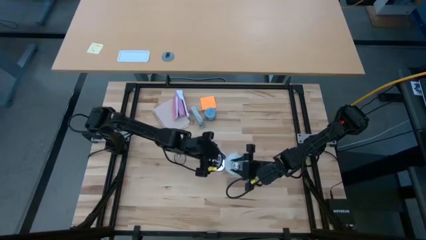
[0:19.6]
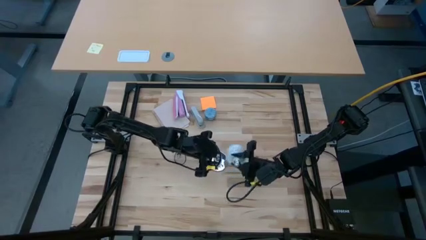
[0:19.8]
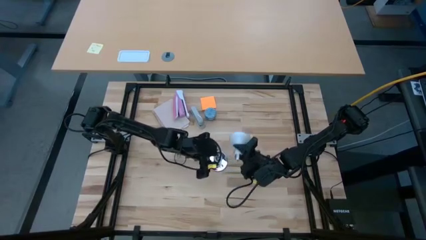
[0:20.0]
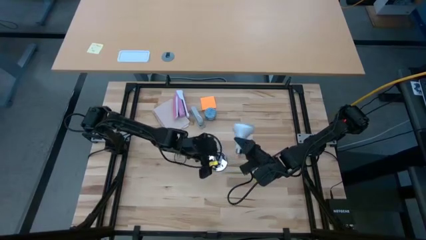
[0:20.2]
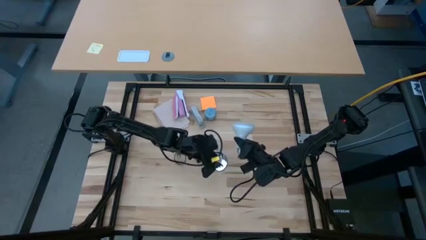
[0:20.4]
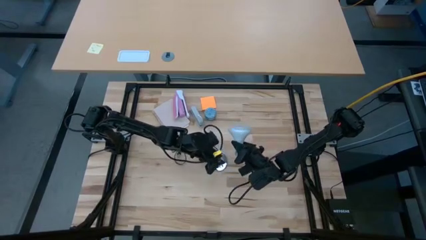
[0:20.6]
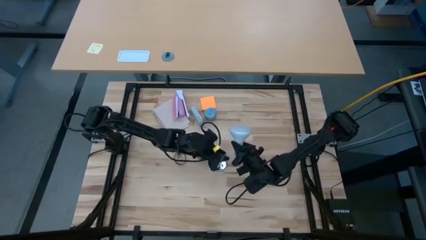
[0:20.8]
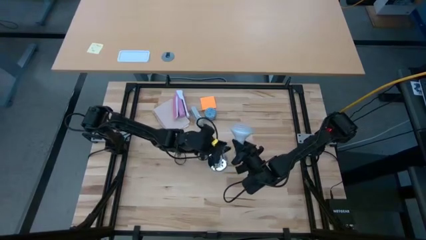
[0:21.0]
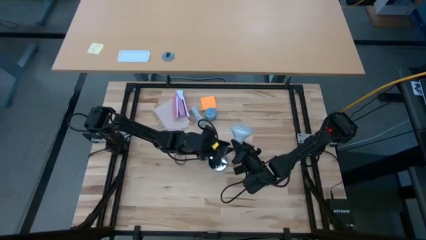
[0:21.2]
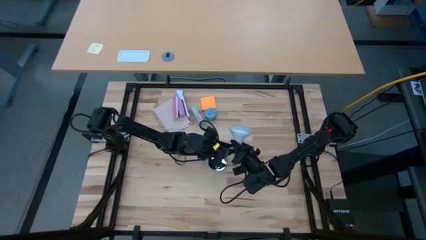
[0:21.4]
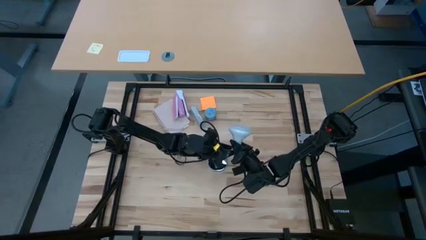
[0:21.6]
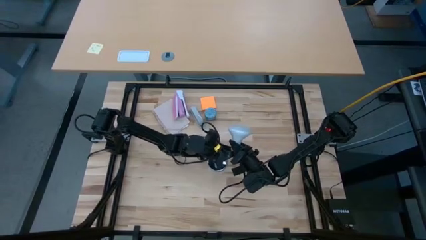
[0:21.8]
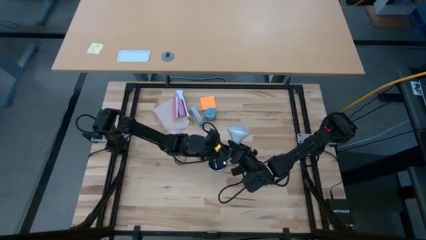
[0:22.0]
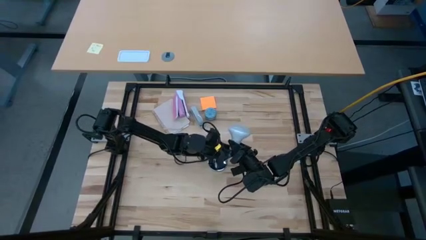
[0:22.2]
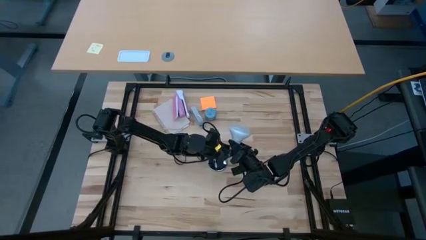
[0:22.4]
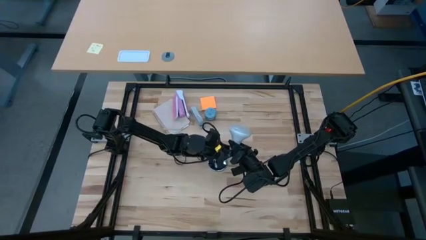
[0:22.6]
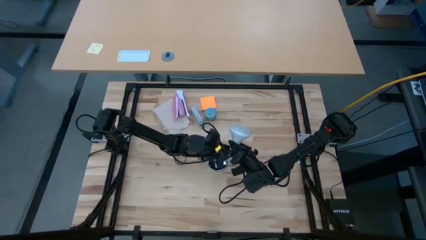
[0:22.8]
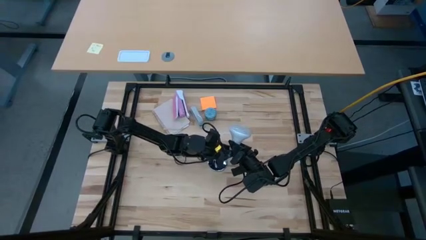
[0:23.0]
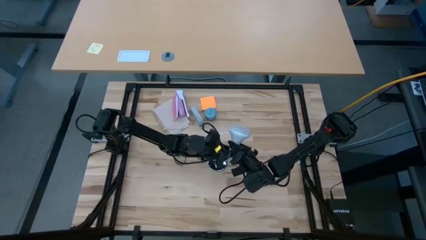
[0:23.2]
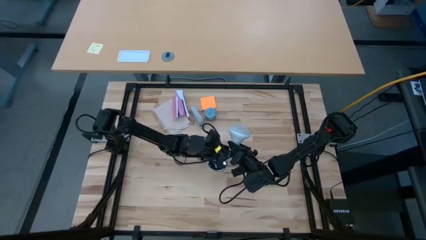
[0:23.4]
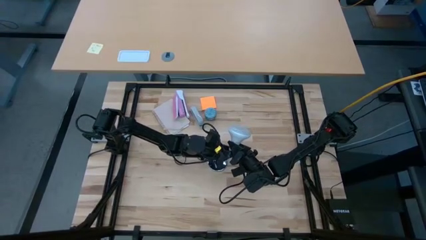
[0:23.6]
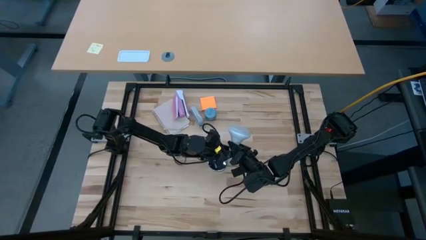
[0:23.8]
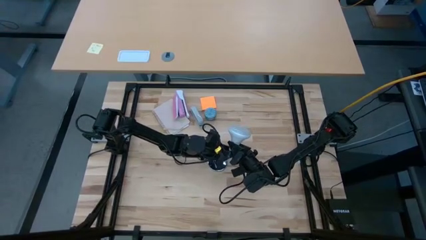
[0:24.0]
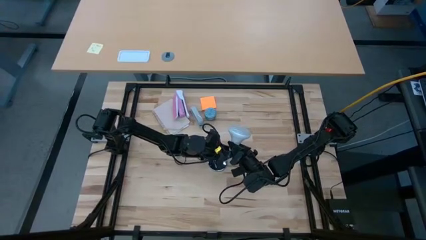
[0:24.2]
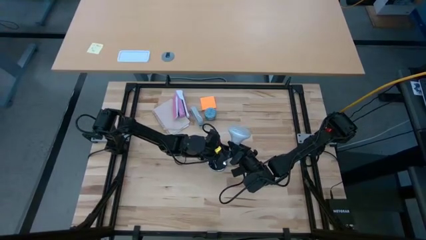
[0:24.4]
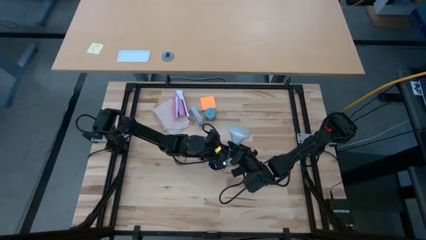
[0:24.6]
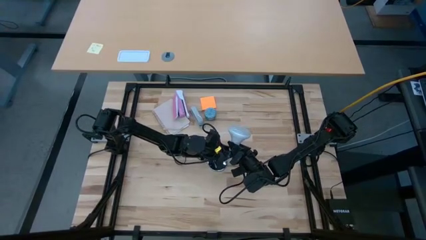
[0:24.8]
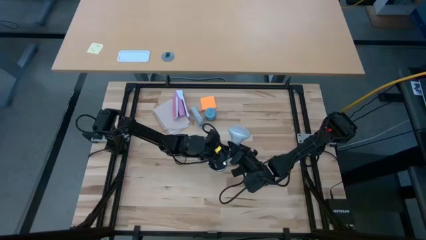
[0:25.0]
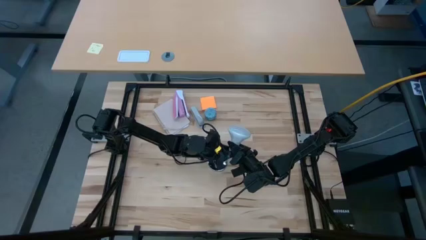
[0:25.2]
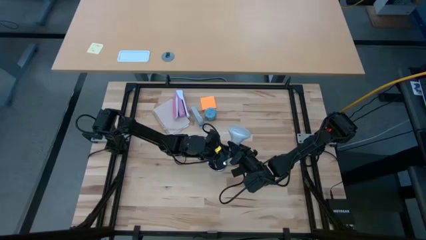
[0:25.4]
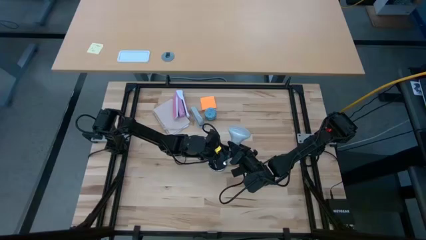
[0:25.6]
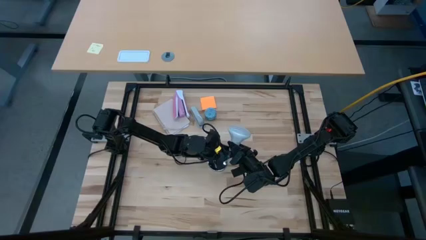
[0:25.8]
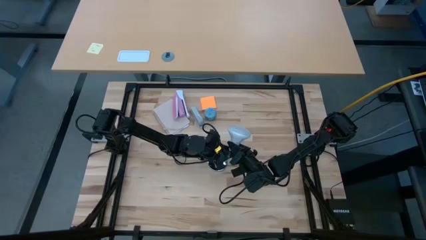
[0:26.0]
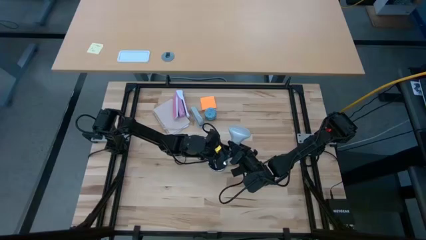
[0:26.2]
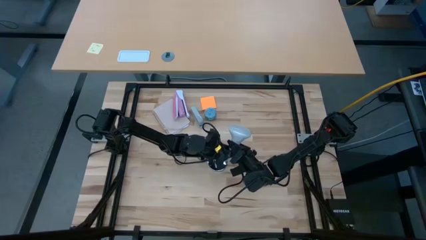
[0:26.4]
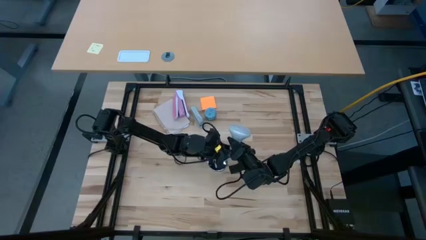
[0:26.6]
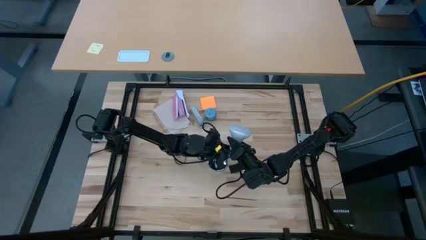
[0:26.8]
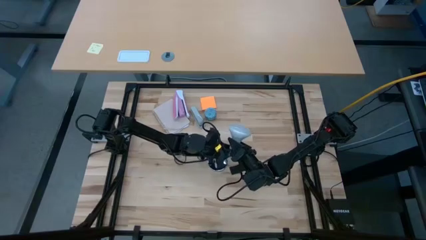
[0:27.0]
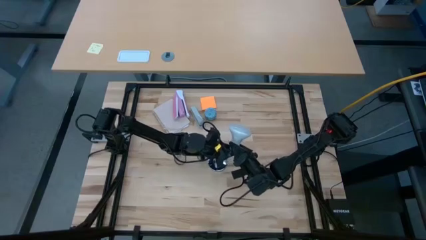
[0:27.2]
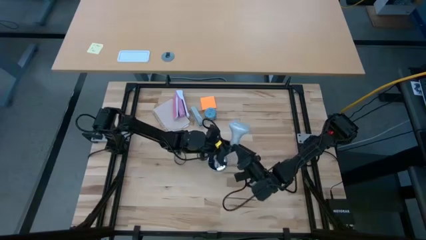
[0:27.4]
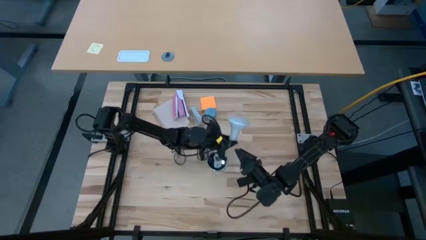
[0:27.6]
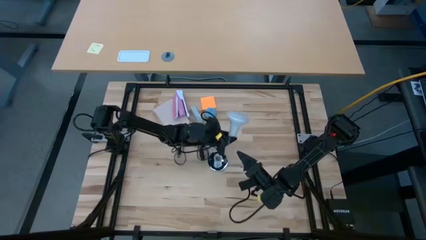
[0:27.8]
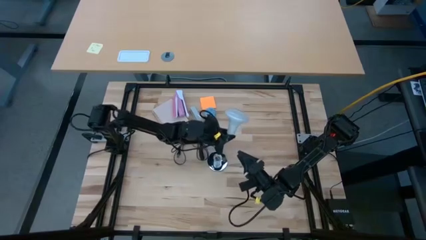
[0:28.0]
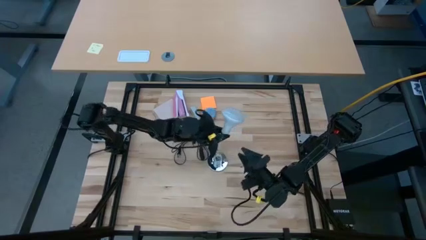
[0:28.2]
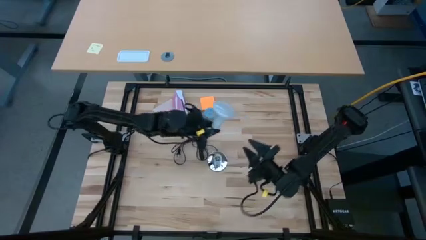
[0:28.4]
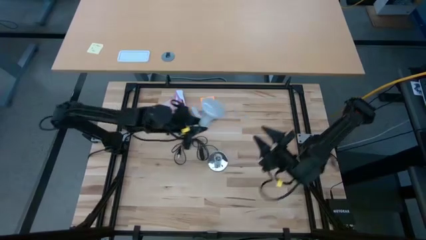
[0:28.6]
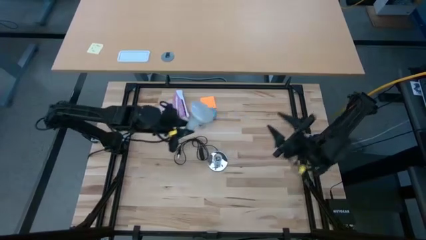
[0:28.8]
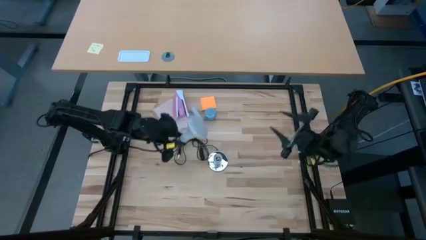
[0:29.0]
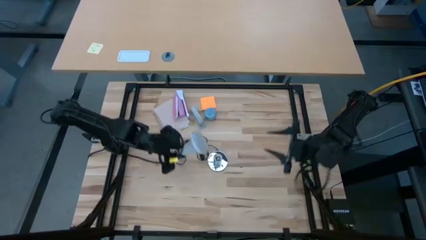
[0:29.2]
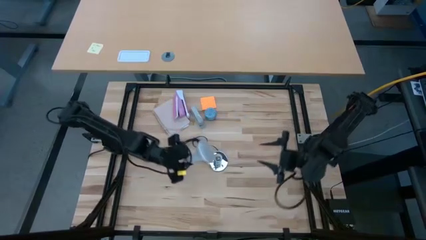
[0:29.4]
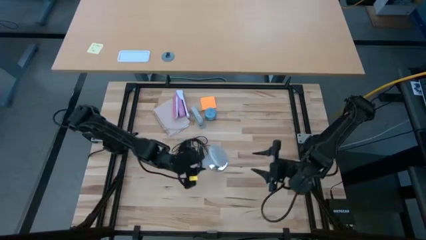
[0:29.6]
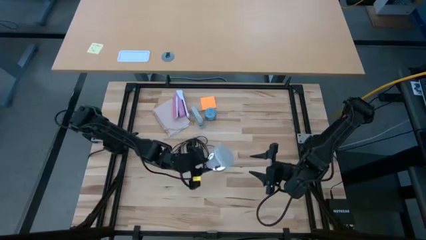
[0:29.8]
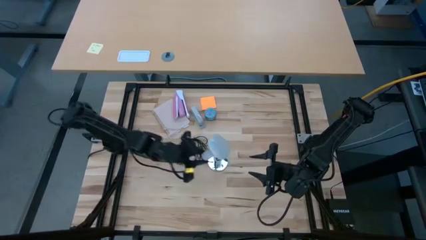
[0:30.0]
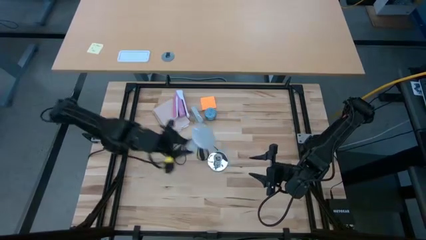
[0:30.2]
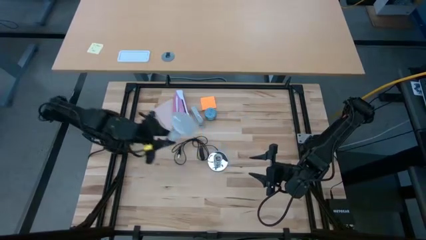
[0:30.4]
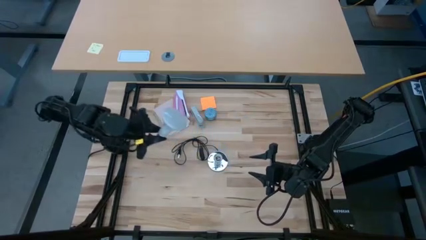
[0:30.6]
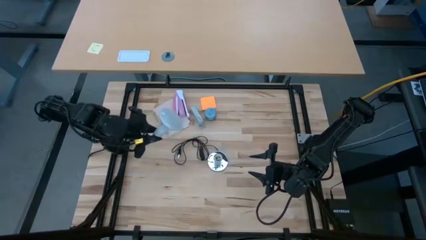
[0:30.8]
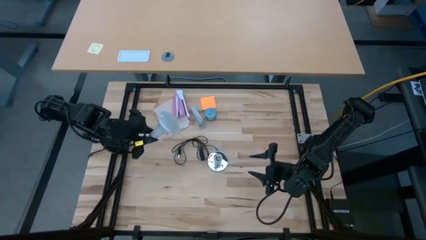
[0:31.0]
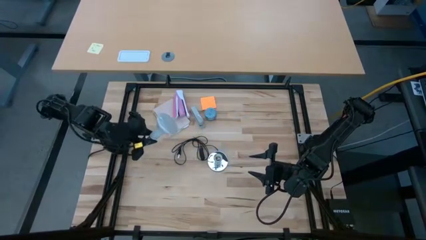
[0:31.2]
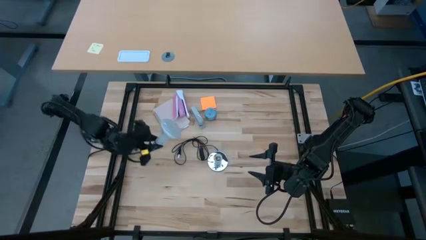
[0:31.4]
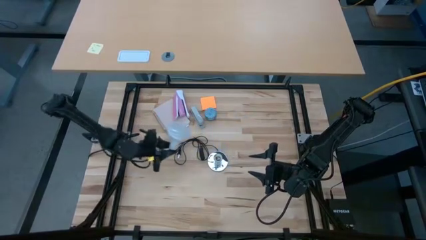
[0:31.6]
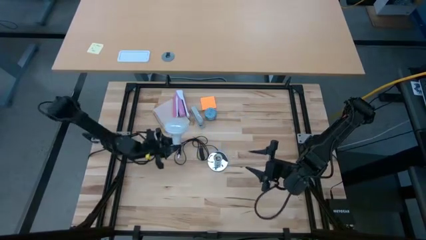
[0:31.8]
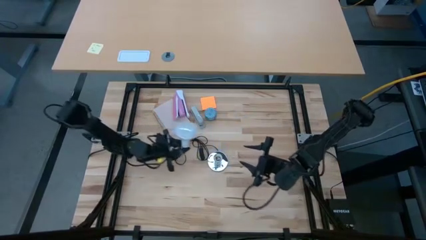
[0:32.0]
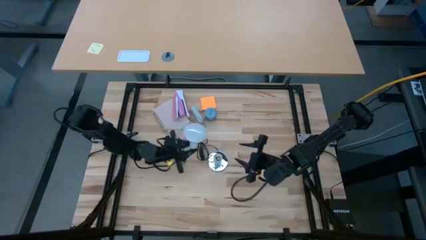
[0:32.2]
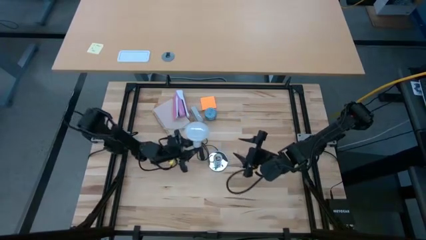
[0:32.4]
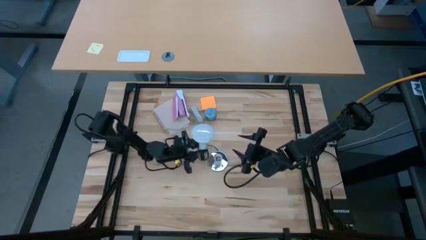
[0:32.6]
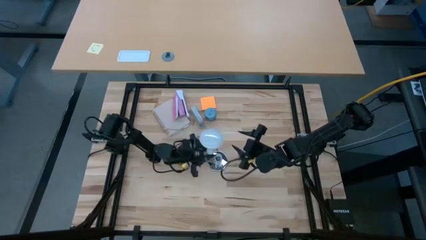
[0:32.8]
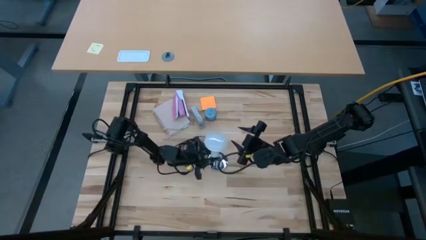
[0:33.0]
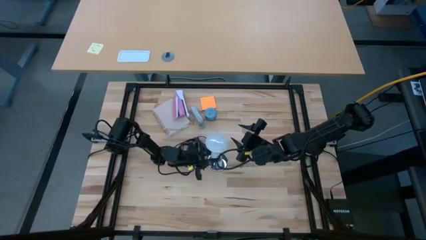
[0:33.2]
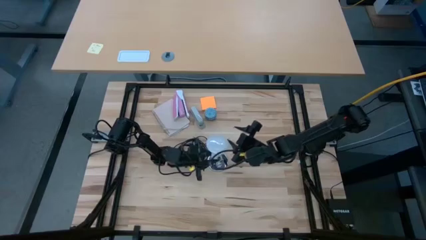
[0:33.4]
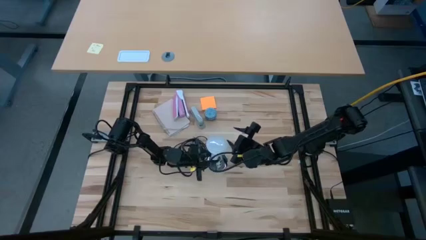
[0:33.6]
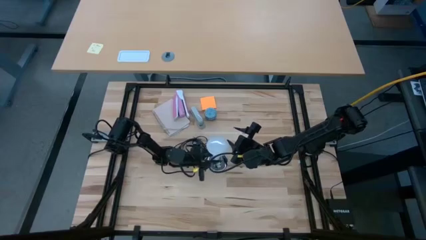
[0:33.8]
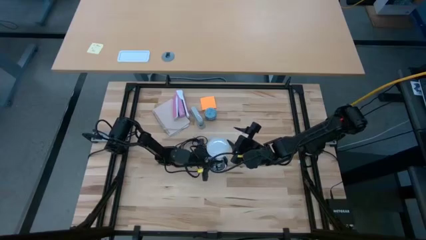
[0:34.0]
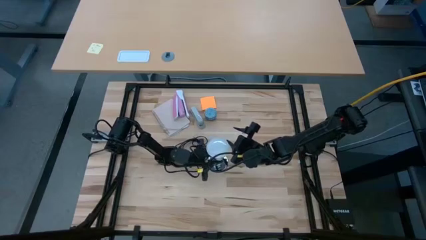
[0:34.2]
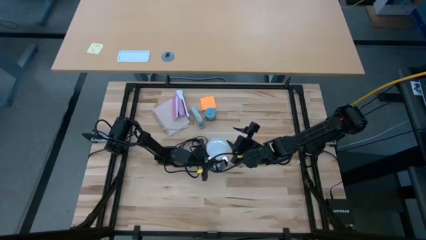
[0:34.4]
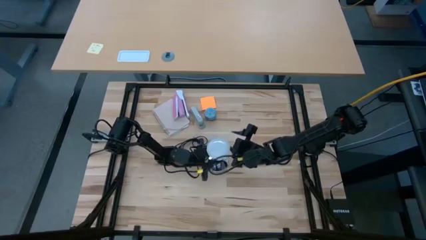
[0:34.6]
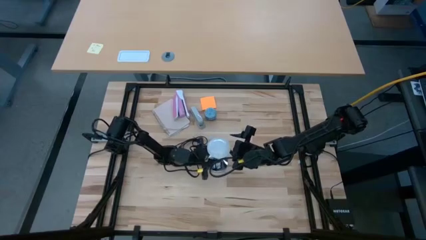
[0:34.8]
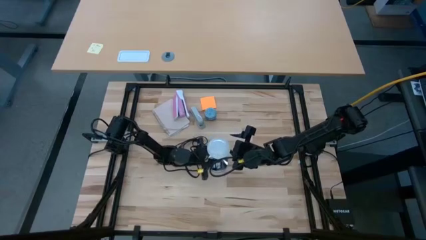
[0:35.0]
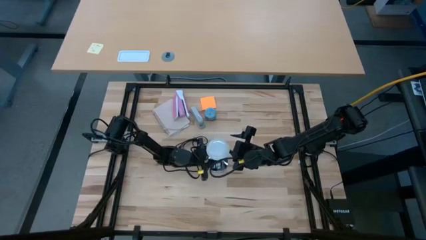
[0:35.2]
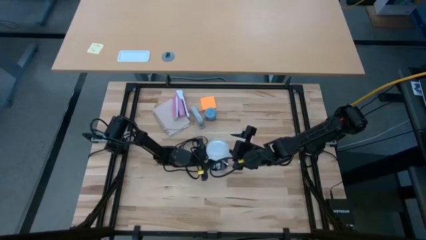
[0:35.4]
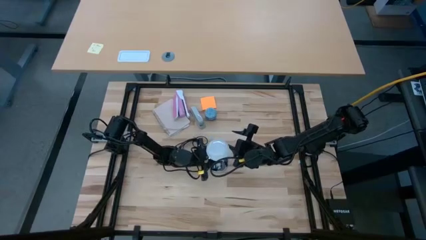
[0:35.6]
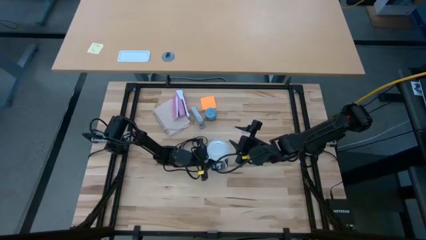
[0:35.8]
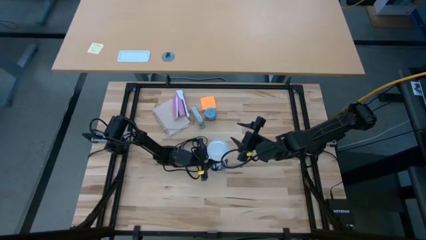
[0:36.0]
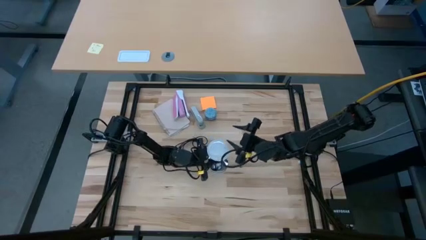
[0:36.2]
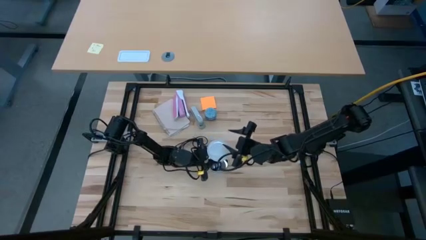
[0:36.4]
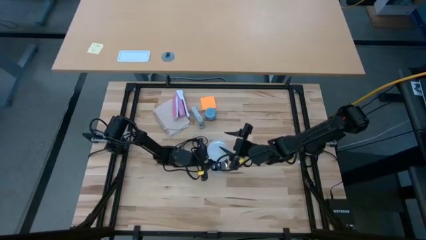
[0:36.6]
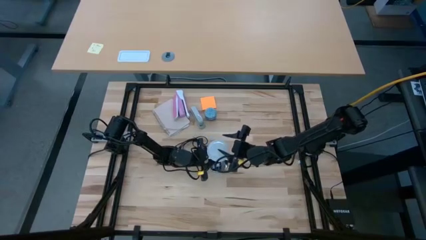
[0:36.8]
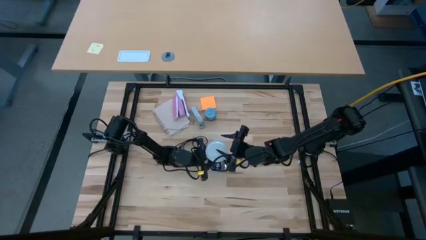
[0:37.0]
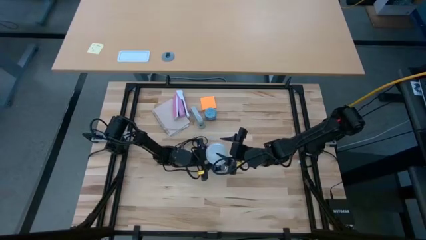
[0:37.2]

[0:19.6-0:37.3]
Task: Screw lightbulb
Insert the white lightbulb into the silver lamp
